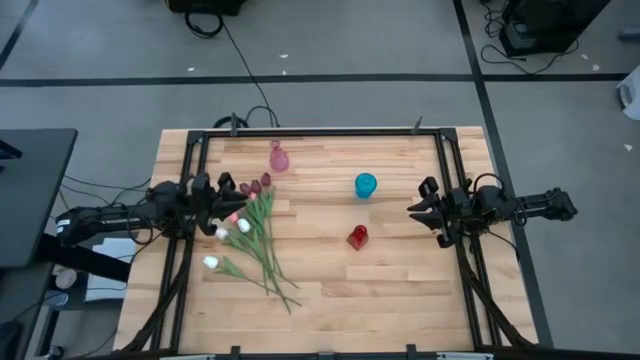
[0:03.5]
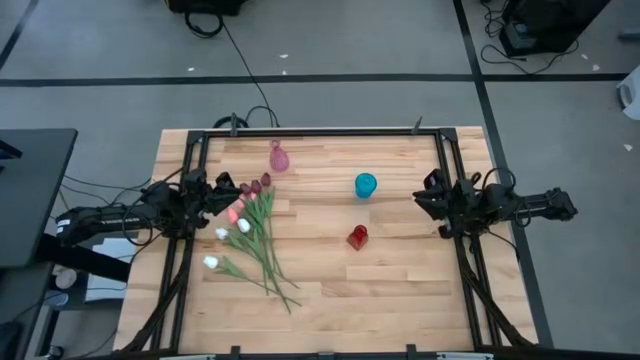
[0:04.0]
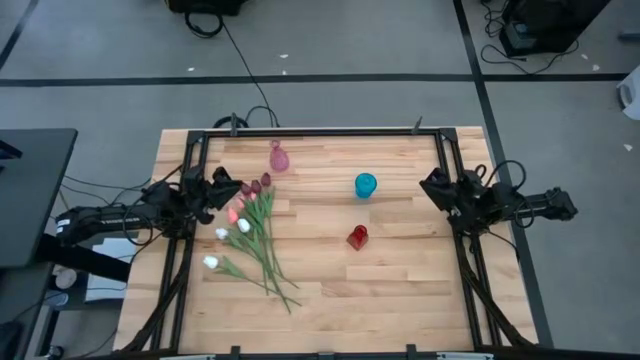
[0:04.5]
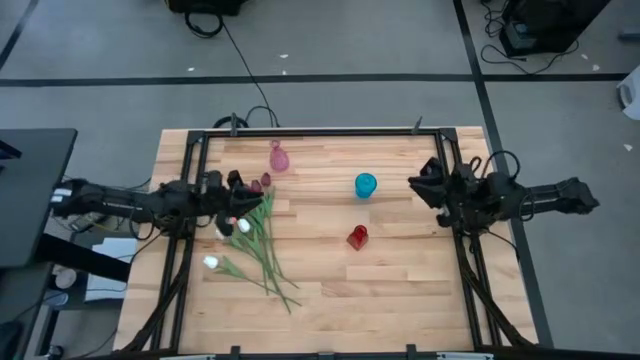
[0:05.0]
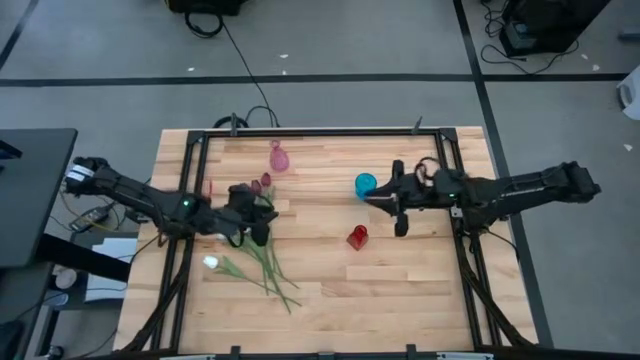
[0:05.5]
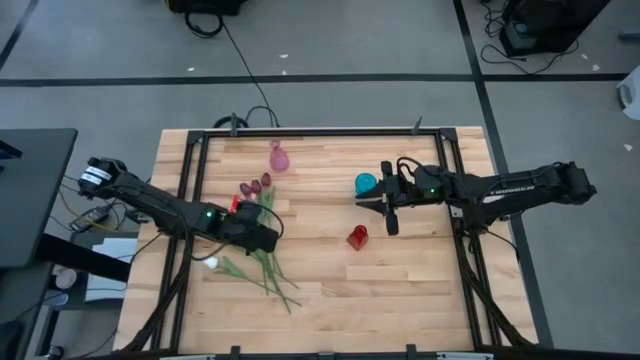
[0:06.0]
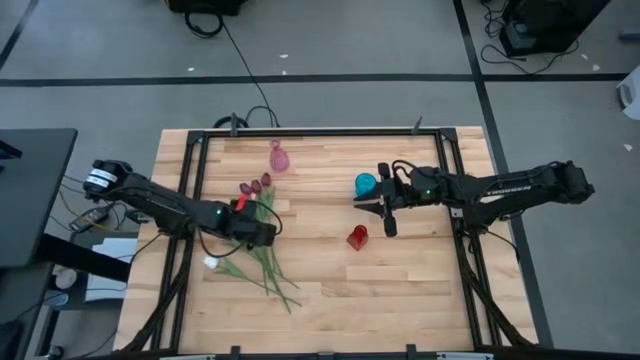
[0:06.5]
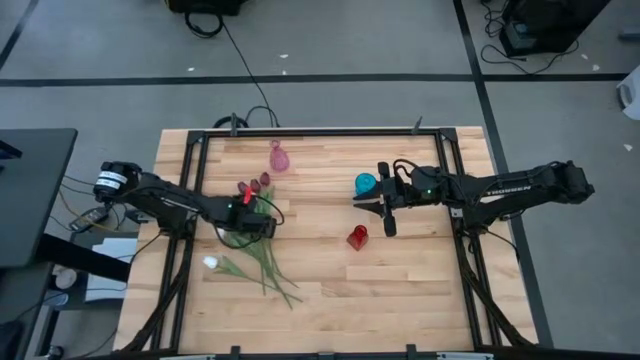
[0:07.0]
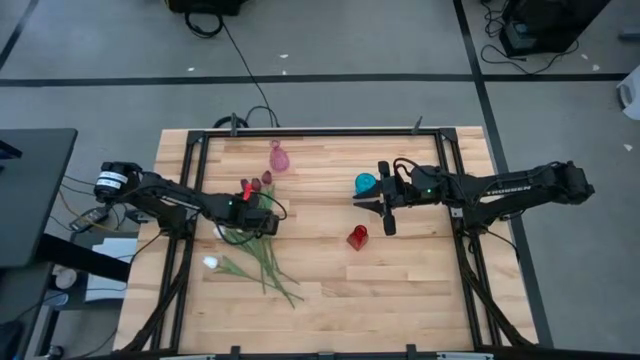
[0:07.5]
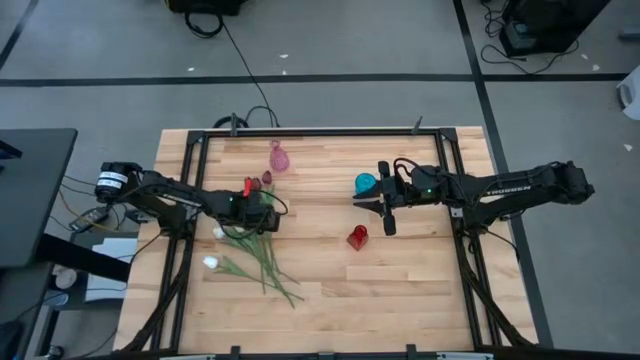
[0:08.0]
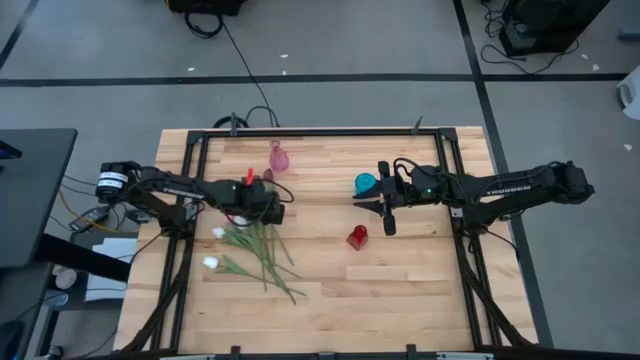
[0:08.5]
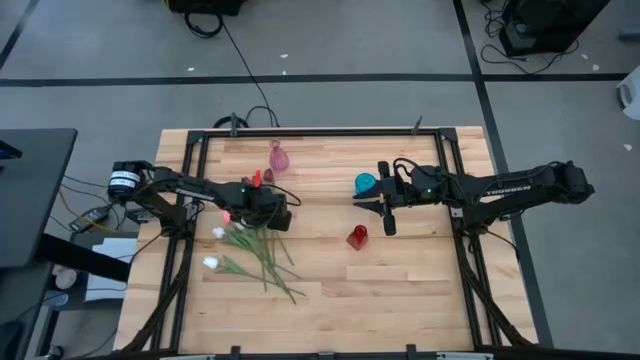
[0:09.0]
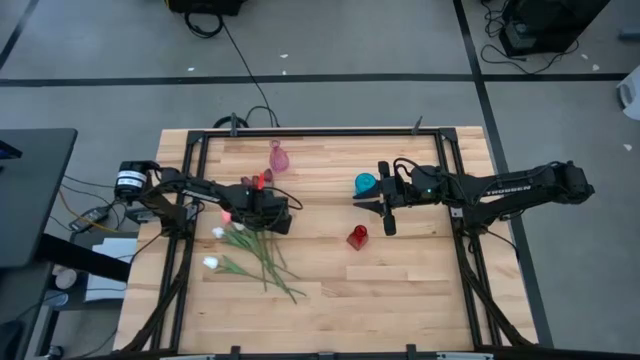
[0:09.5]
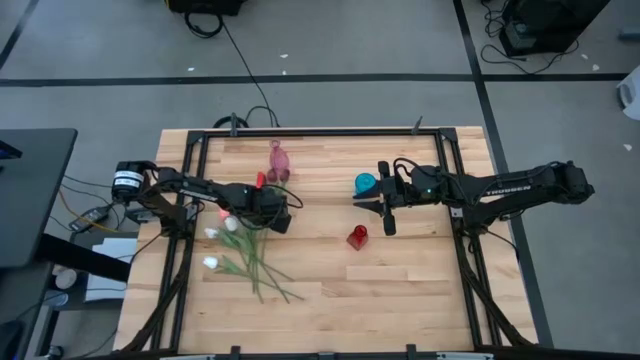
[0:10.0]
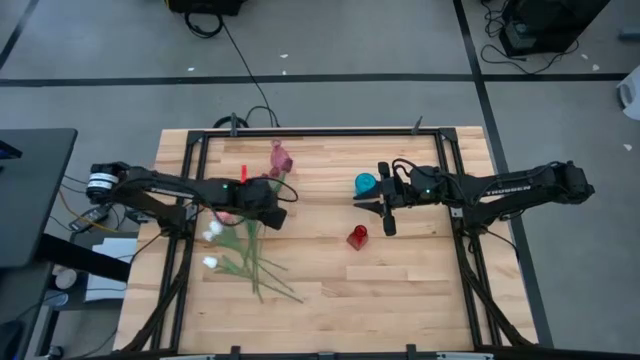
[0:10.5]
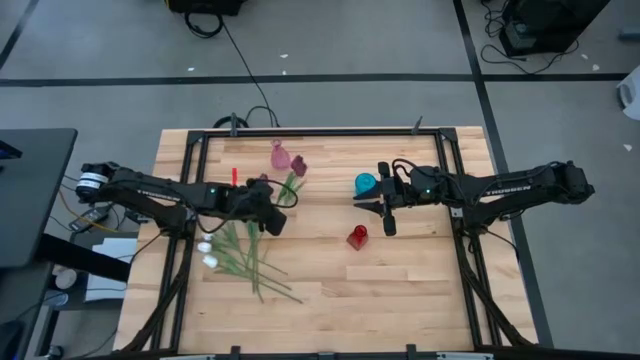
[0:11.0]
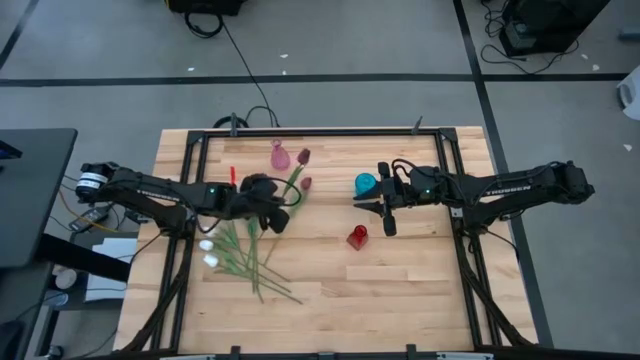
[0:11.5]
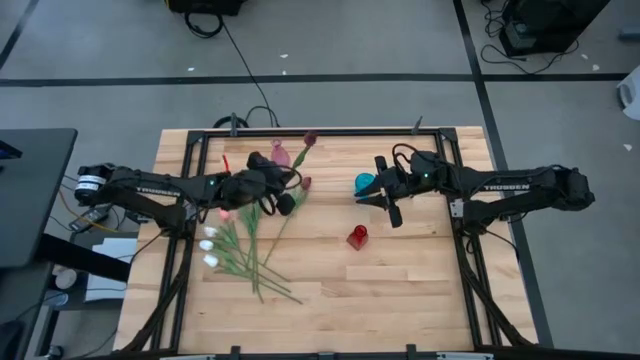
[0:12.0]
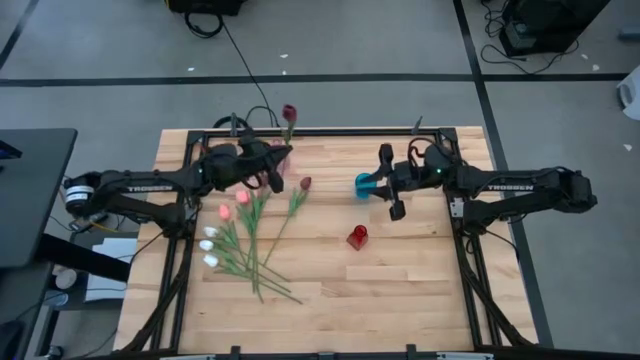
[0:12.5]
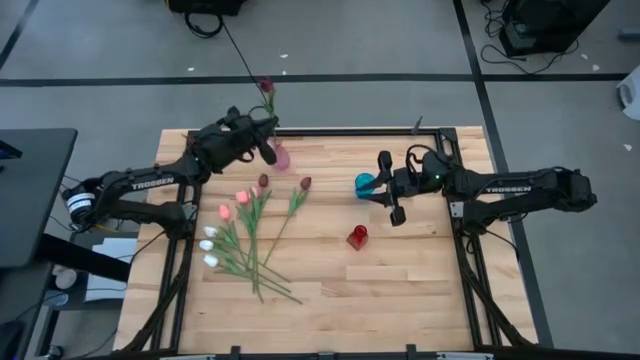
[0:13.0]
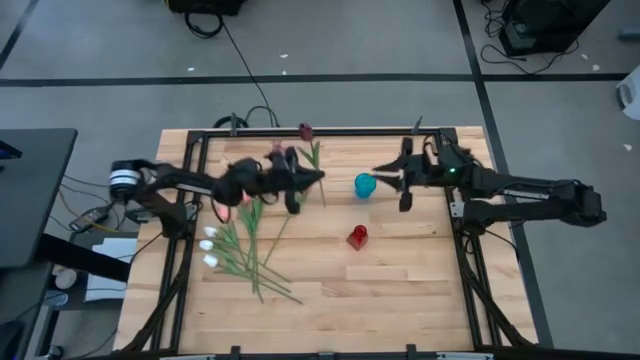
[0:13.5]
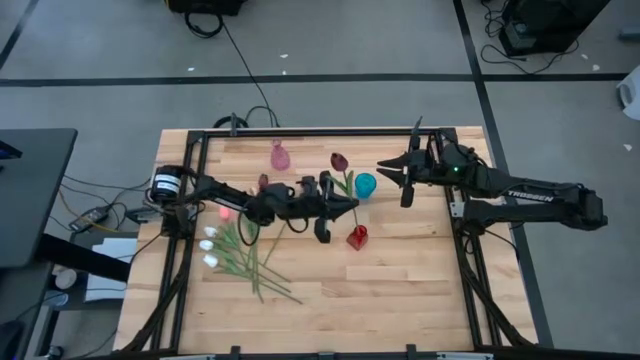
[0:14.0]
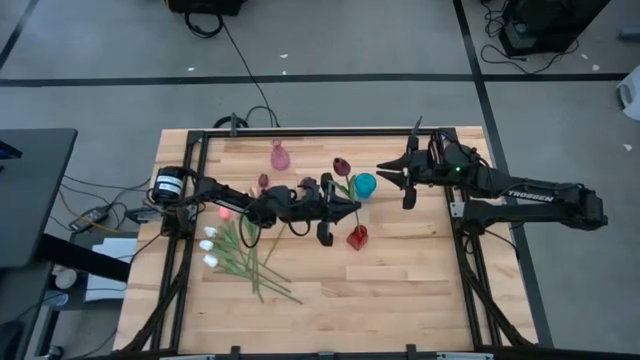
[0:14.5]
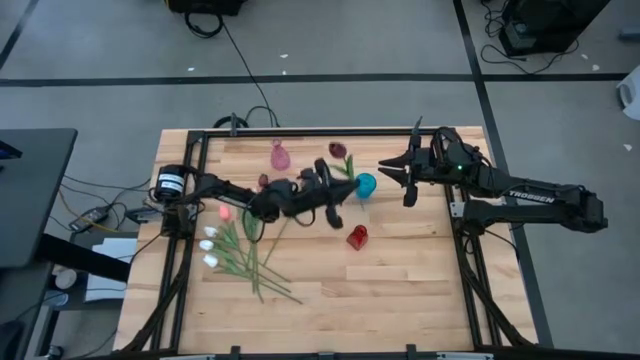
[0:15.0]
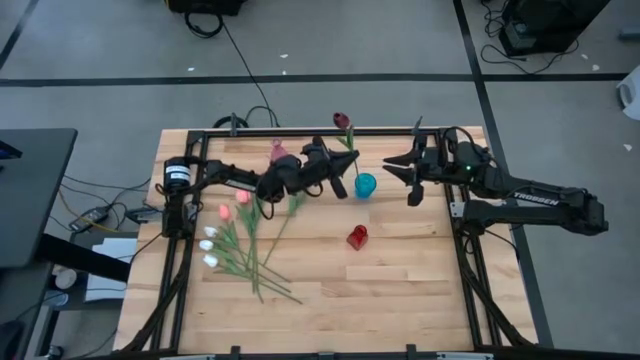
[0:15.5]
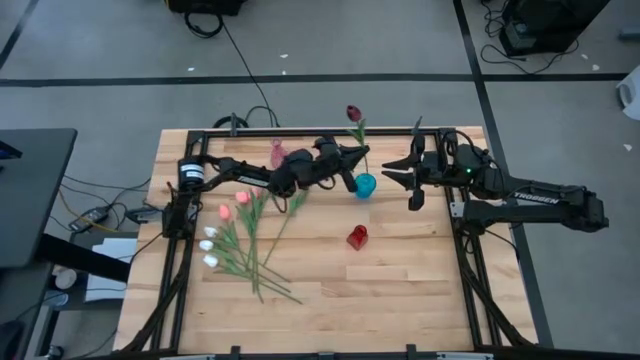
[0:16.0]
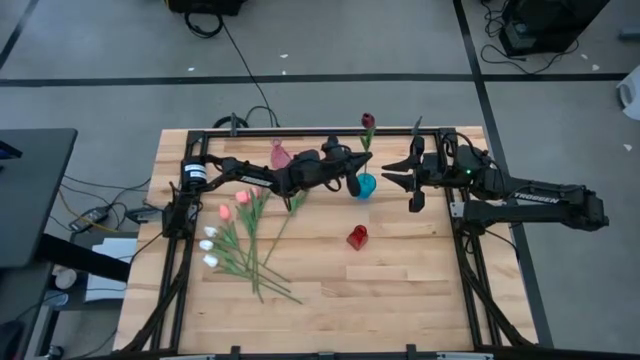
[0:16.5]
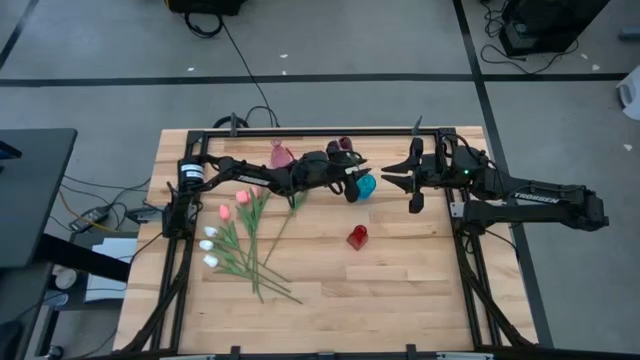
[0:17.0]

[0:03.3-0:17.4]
Task: Sort flowers into vase by color
Put the left red tulip into the blue vase

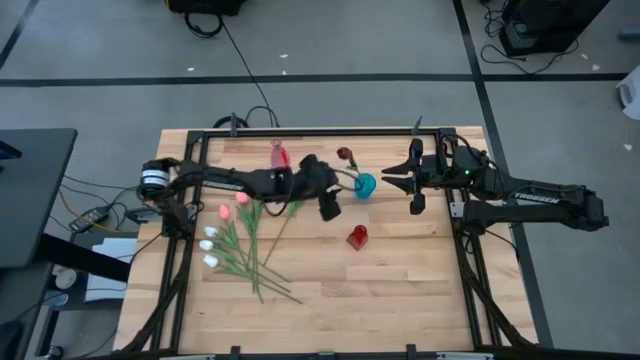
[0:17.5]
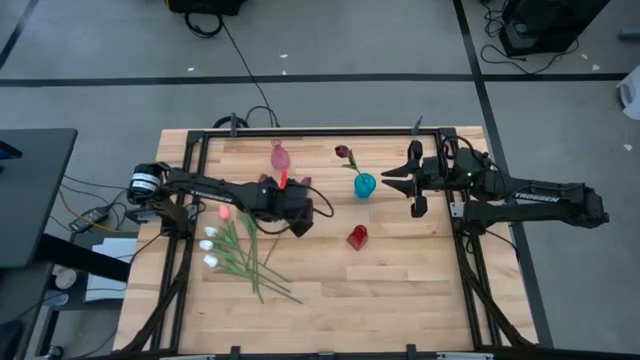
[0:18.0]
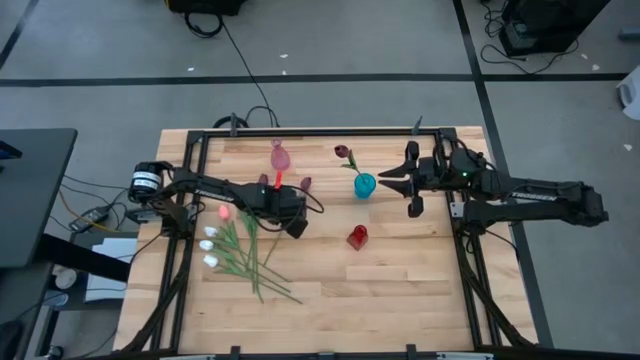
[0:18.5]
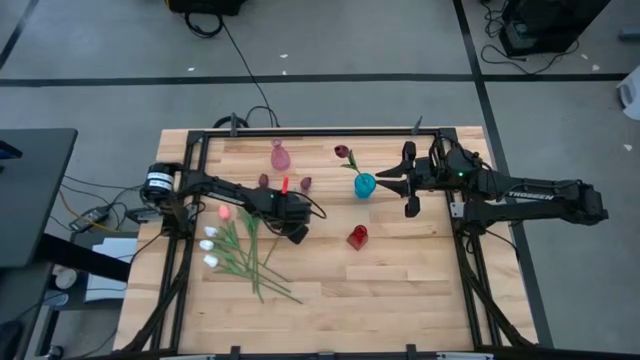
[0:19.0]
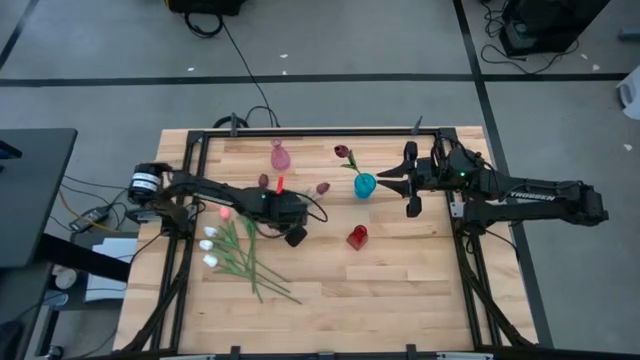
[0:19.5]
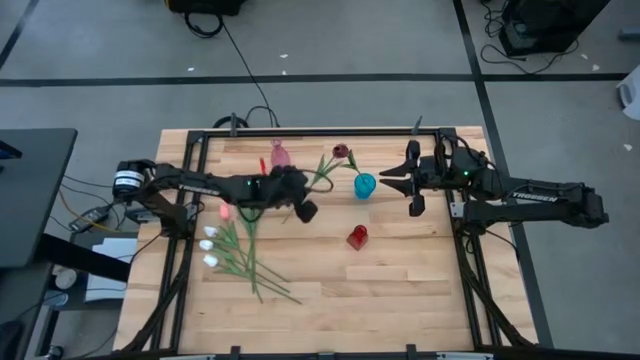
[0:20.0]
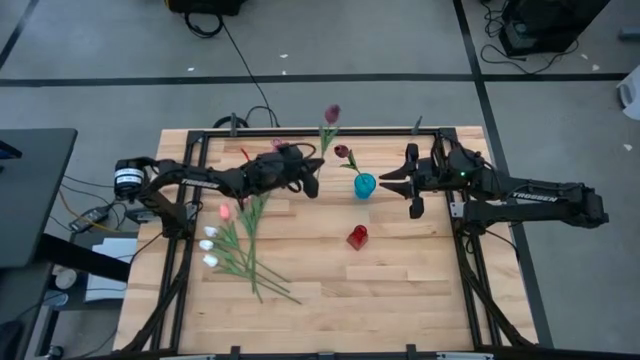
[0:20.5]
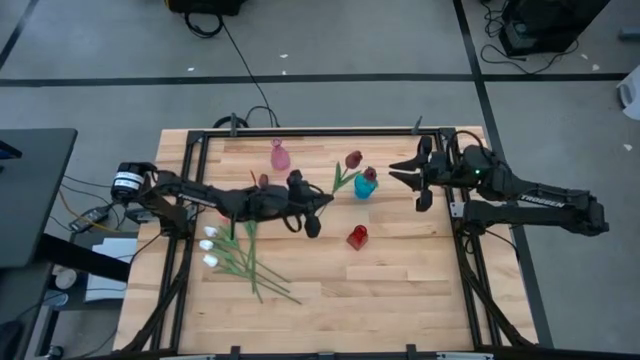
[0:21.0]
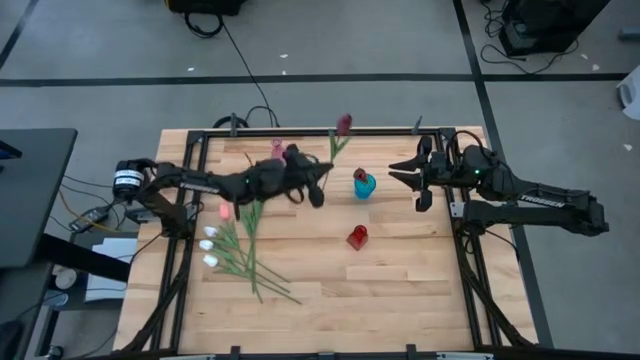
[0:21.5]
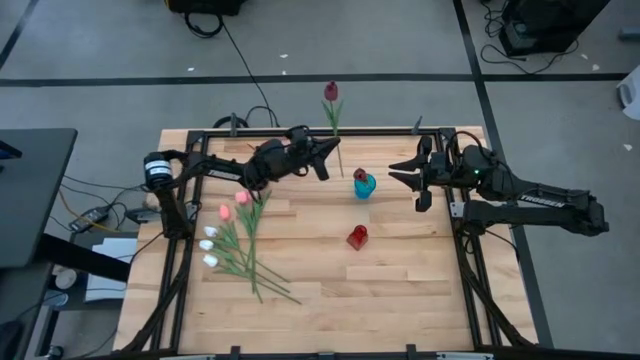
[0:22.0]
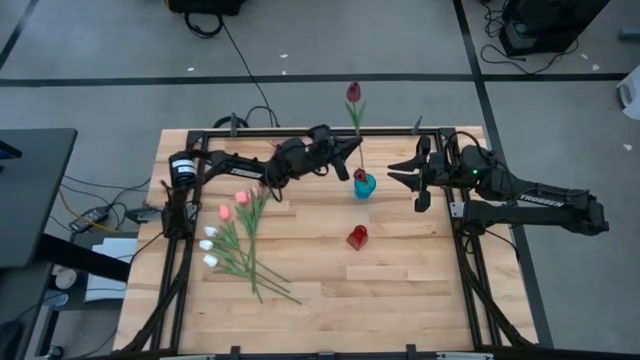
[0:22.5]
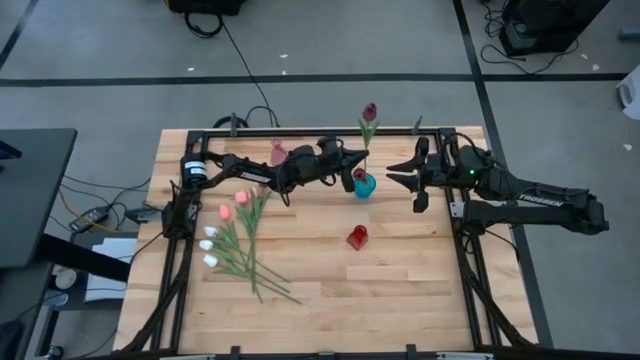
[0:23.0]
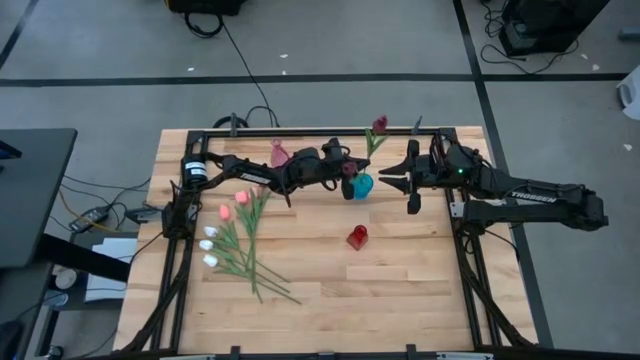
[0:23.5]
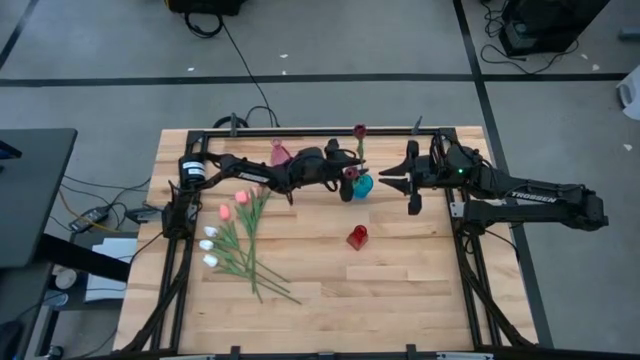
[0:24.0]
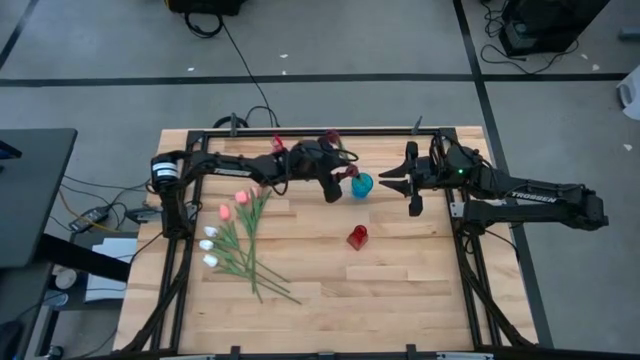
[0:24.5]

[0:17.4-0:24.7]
Put the right red tulip into the blue vase
